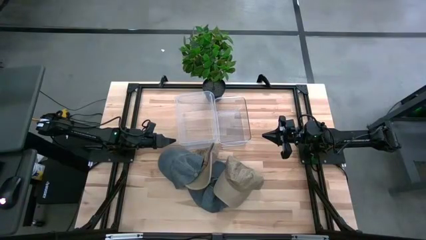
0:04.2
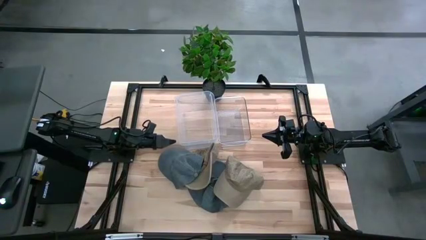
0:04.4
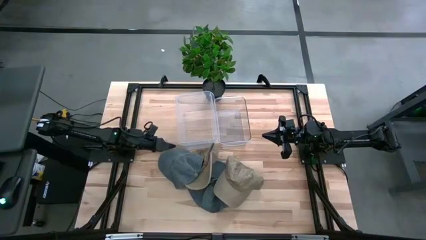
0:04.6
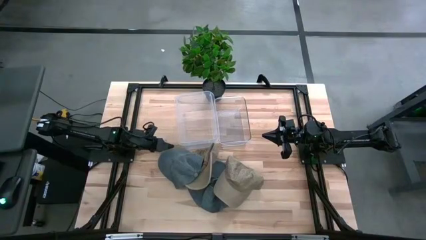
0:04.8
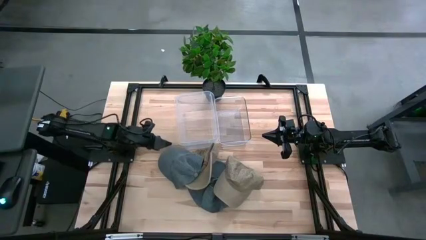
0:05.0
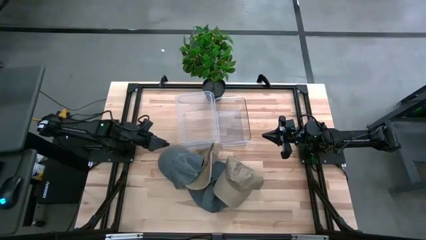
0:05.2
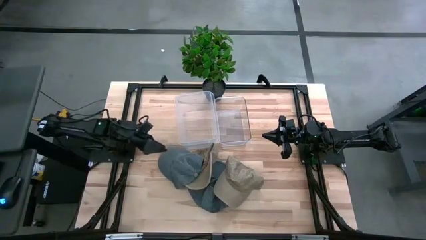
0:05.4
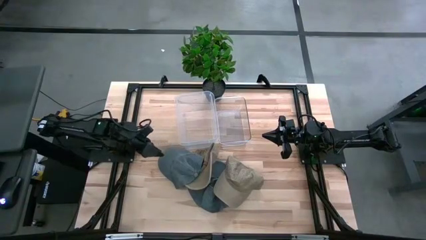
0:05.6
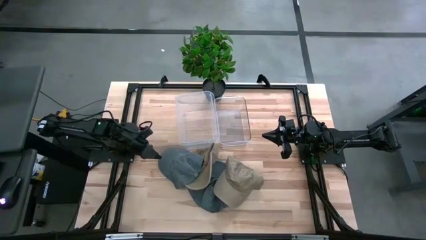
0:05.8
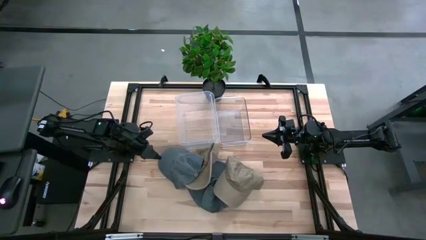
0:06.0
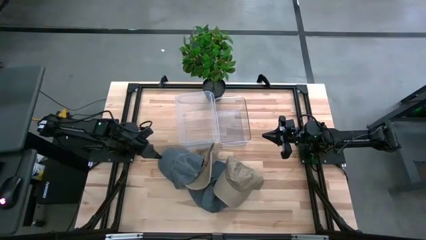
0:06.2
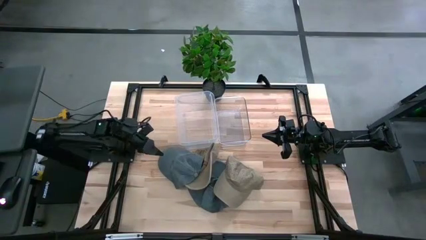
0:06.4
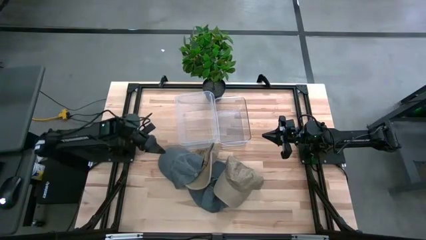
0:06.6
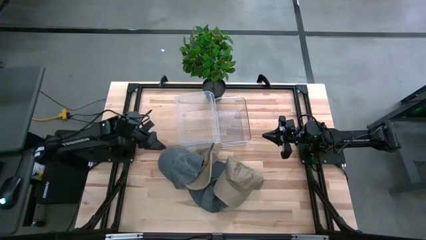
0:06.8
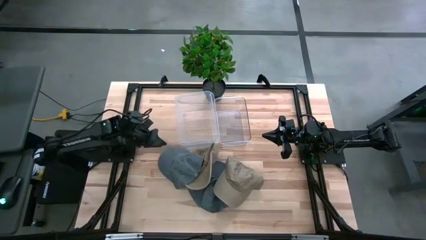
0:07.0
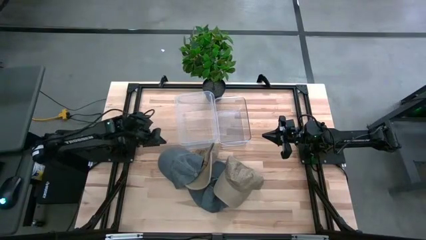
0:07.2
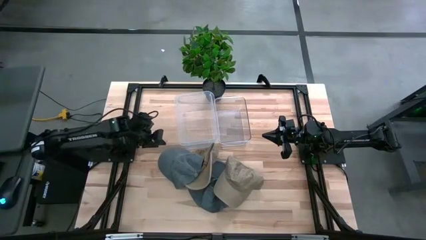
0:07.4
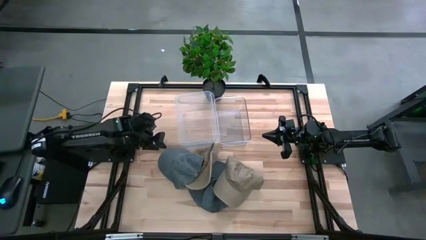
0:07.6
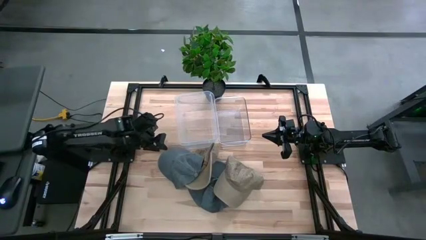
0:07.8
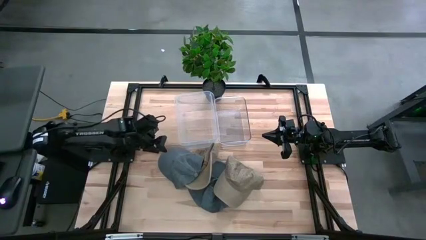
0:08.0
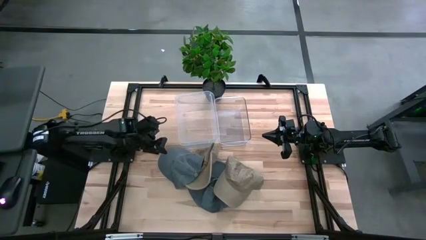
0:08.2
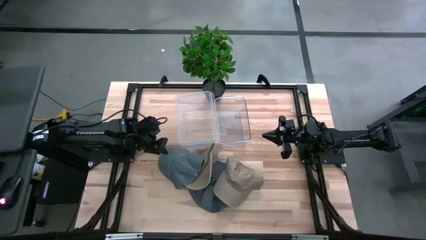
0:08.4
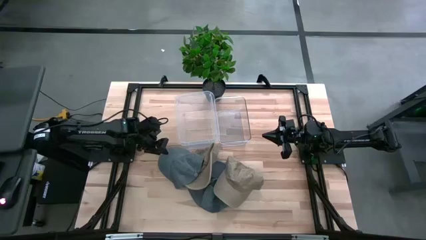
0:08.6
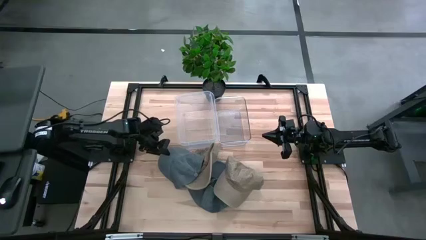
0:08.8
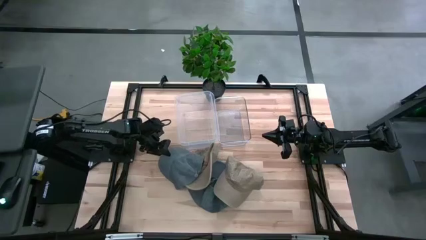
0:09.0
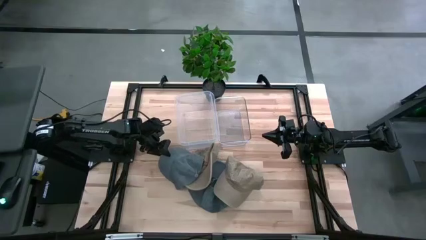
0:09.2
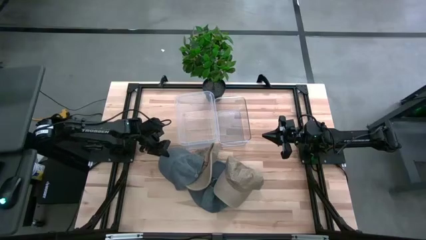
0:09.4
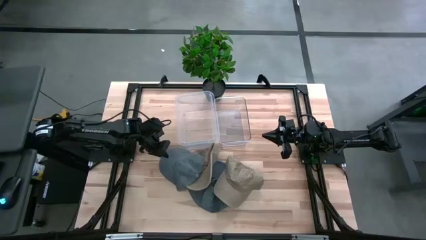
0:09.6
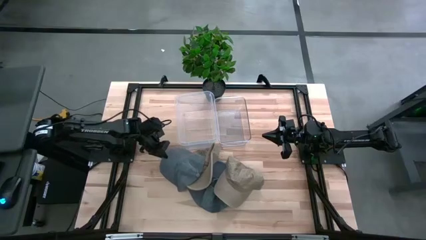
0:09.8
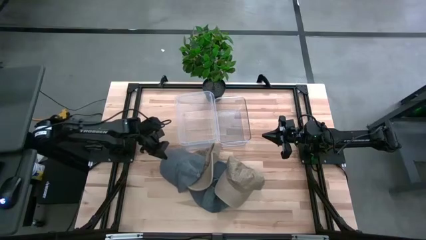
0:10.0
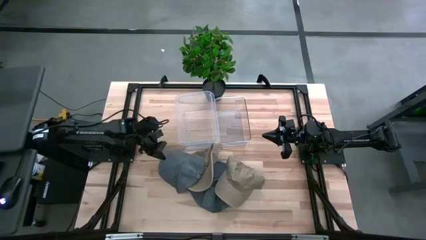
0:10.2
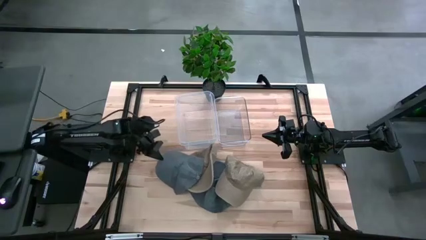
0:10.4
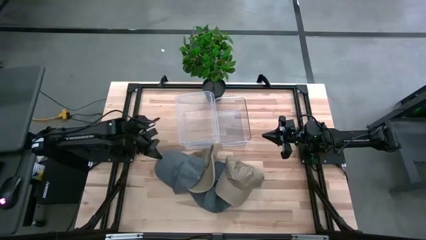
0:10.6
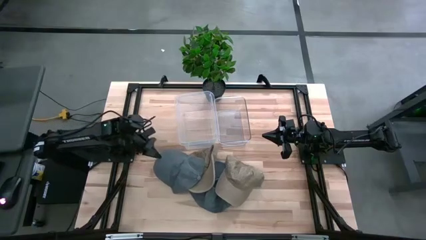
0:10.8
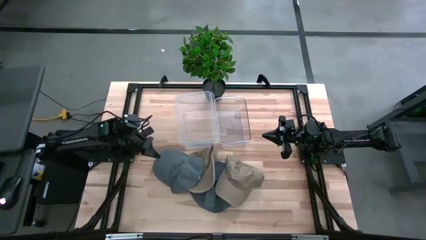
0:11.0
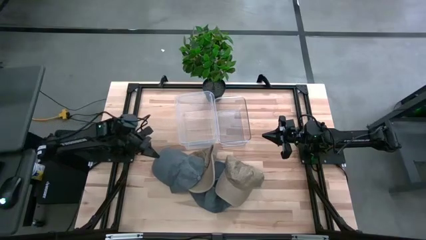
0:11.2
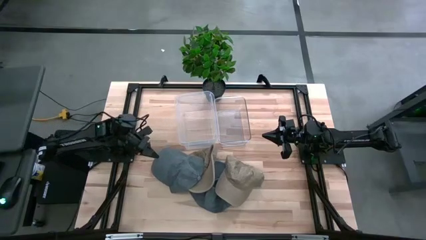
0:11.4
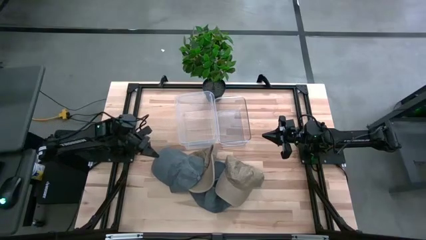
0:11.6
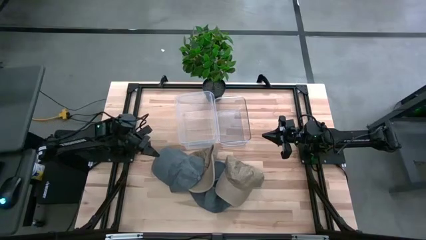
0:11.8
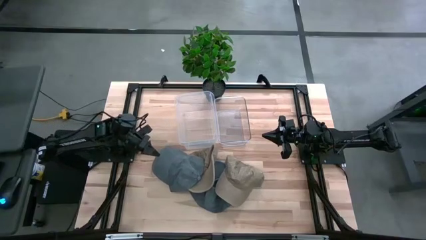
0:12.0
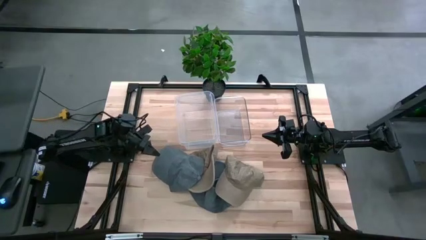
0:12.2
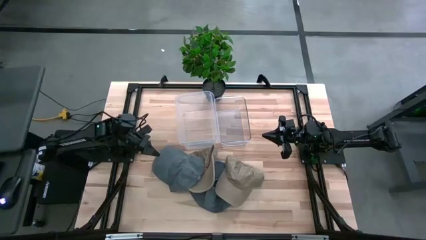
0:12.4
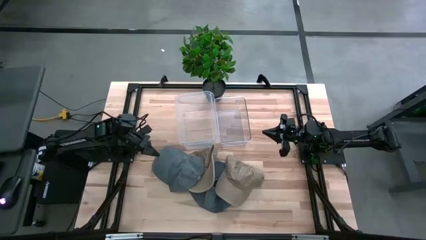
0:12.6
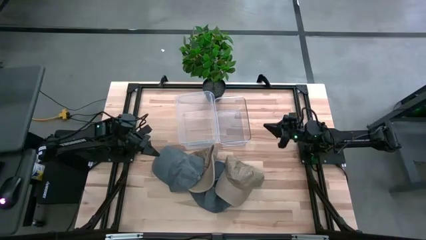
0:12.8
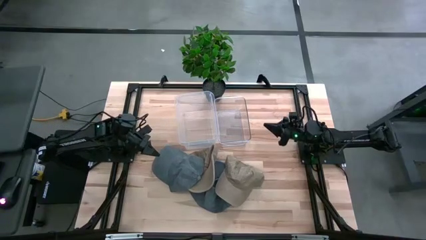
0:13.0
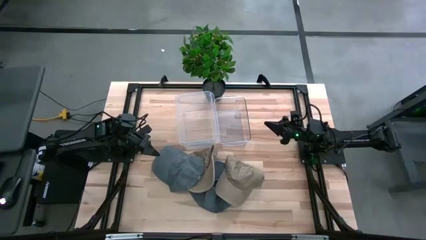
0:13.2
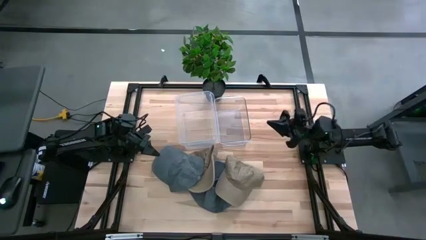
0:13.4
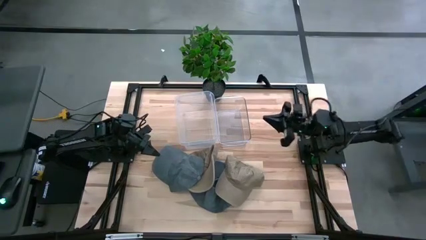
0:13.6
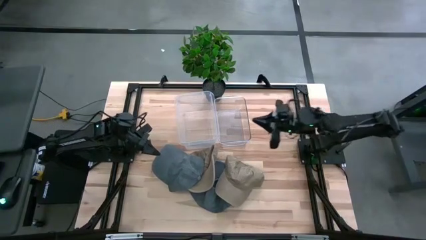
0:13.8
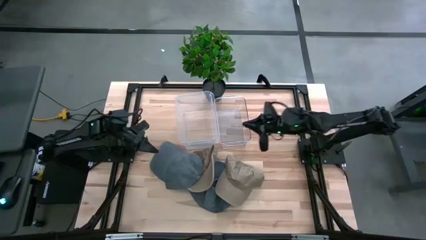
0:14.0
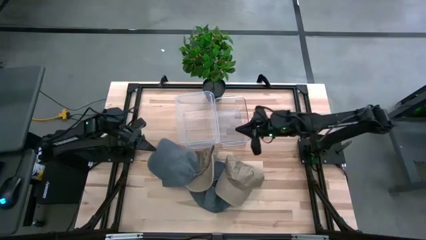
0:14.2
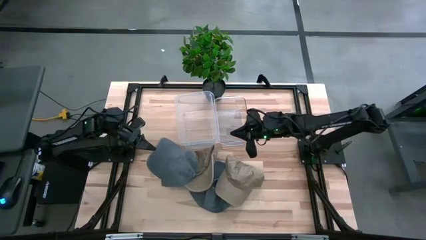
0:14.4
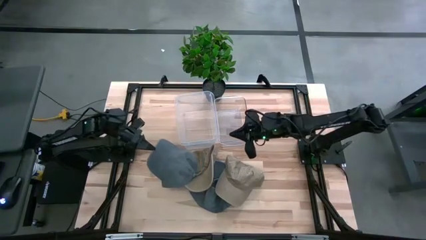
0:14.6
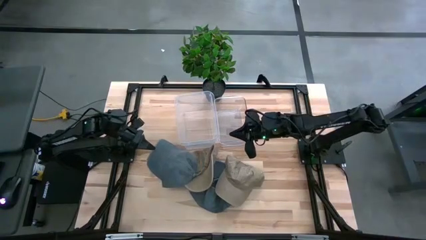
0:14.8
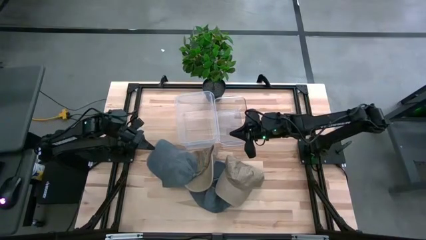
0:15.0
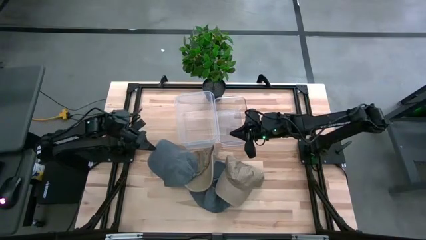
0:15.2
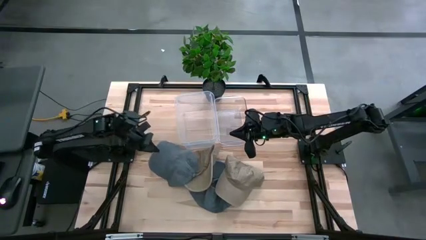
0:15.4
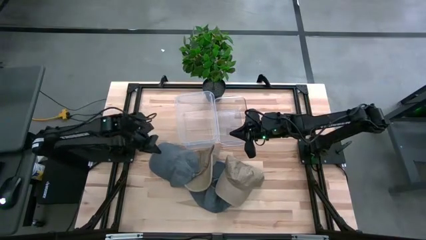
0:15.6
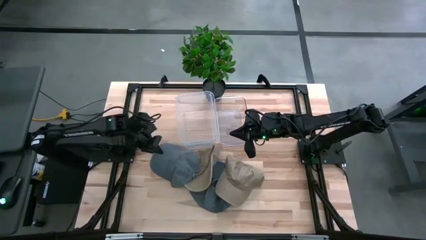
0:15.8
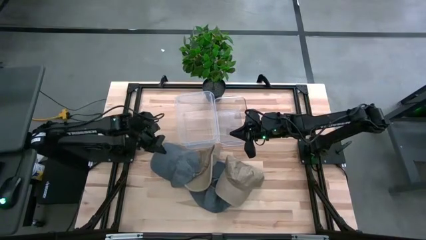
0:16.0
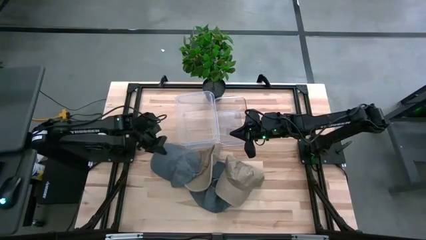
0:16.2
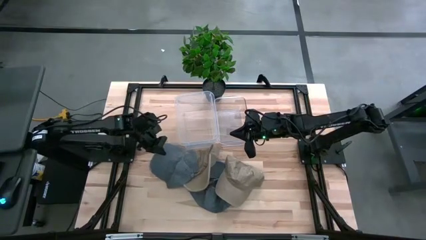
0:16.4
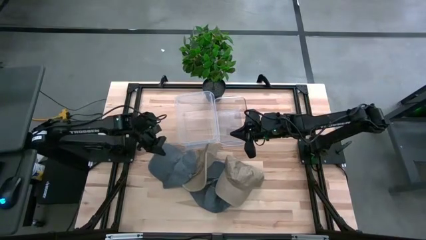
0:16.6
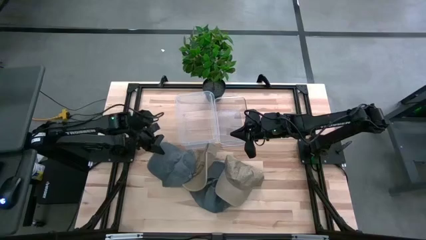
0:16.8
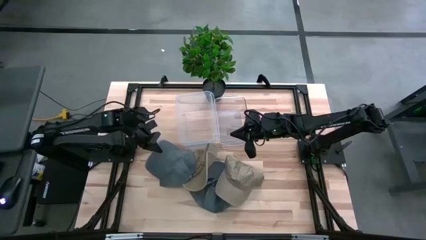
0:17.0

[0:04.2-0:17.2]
Task: Pick & Place hat
Put the top gray cap into the right transparent bin
